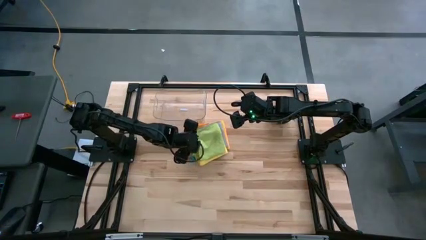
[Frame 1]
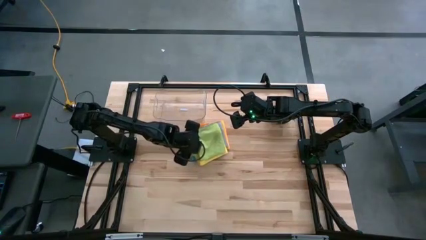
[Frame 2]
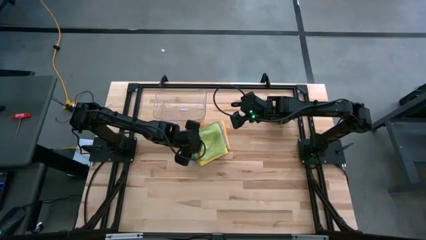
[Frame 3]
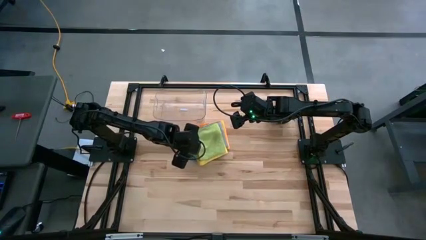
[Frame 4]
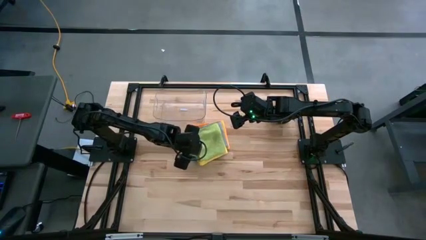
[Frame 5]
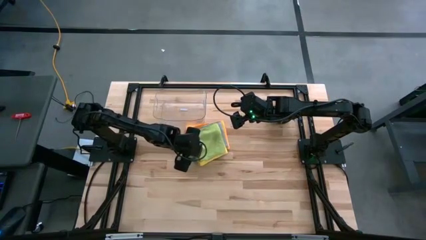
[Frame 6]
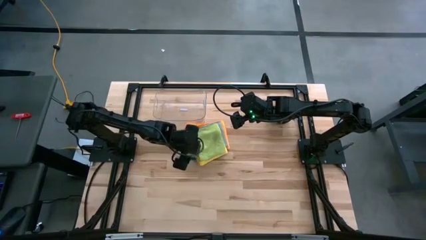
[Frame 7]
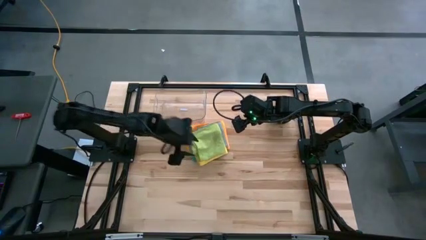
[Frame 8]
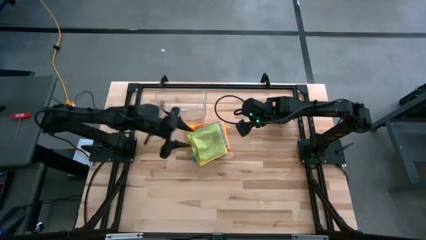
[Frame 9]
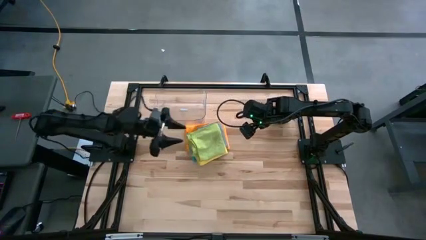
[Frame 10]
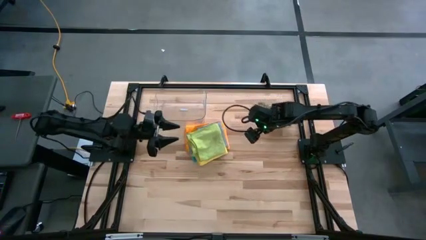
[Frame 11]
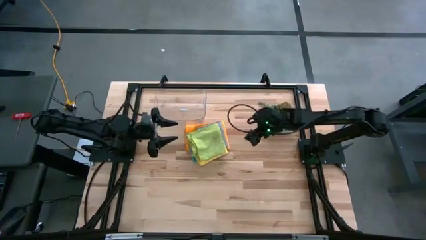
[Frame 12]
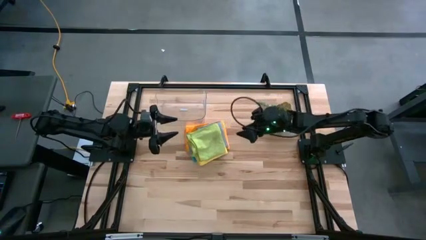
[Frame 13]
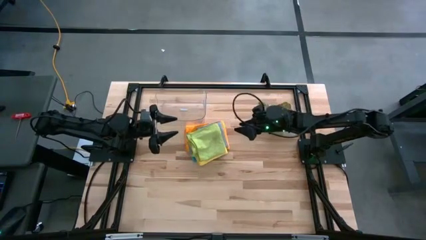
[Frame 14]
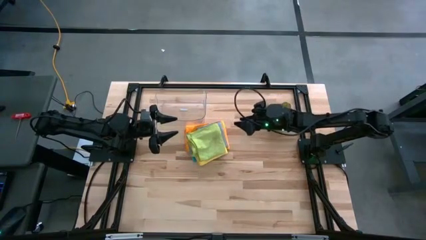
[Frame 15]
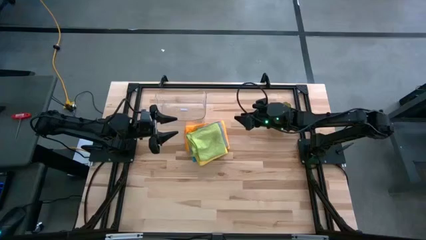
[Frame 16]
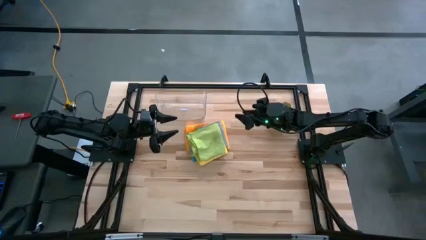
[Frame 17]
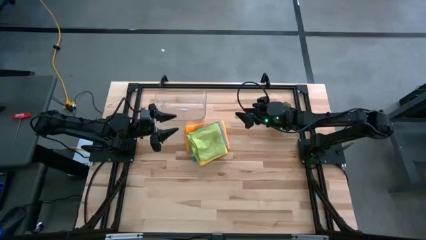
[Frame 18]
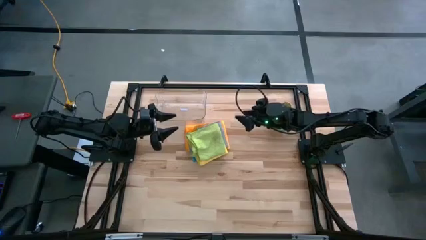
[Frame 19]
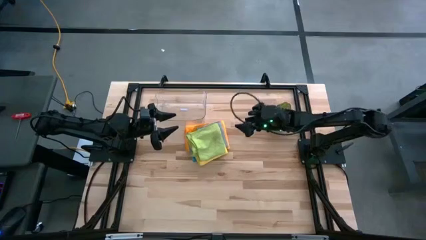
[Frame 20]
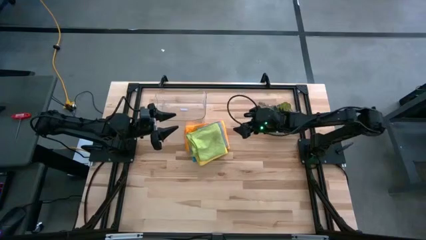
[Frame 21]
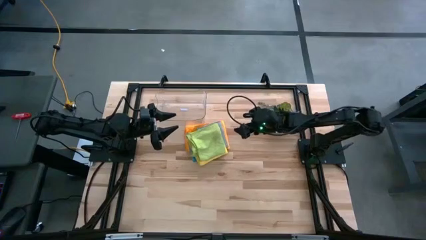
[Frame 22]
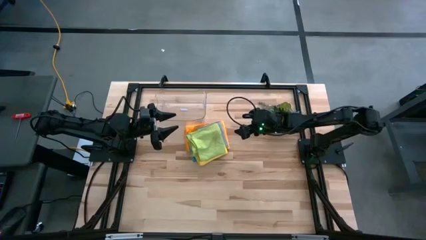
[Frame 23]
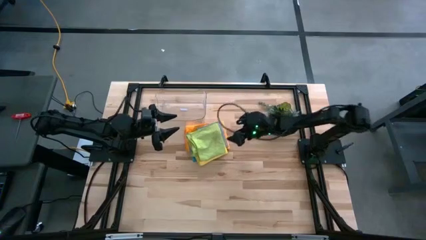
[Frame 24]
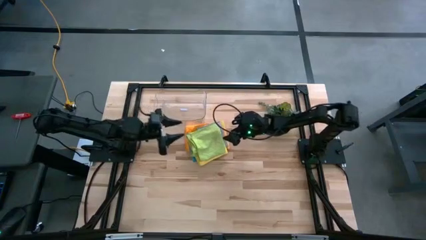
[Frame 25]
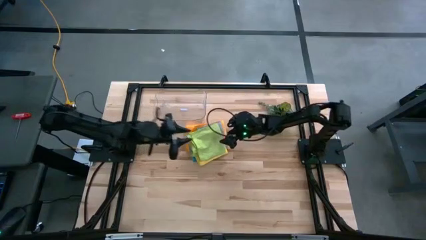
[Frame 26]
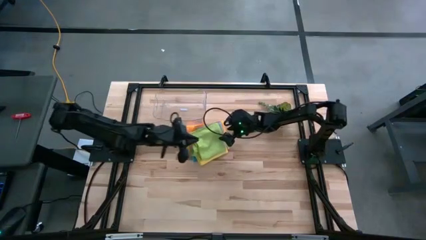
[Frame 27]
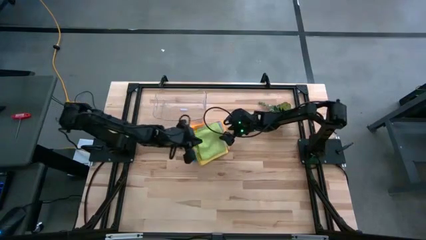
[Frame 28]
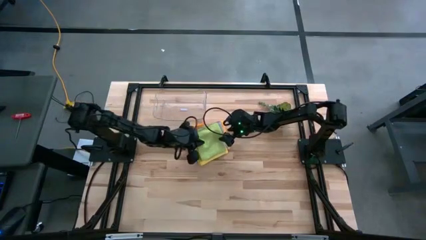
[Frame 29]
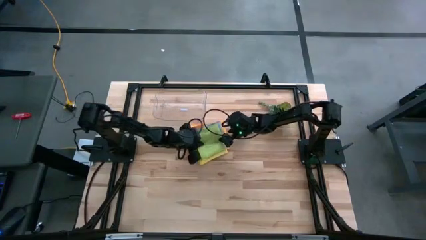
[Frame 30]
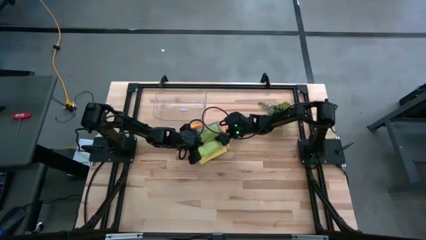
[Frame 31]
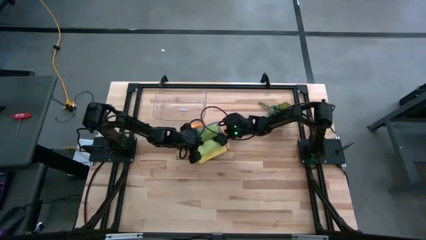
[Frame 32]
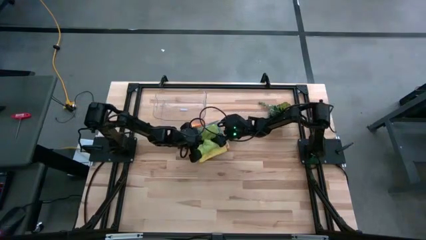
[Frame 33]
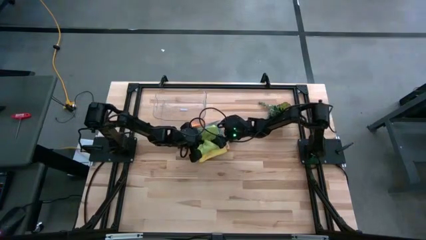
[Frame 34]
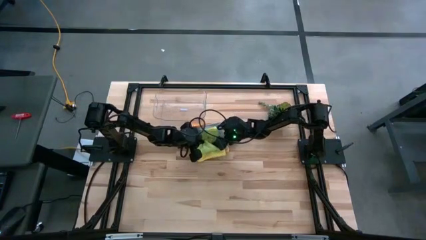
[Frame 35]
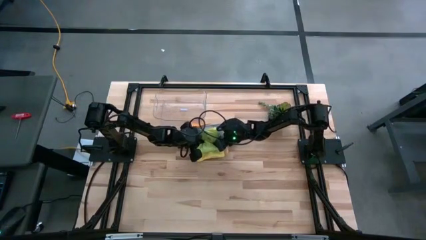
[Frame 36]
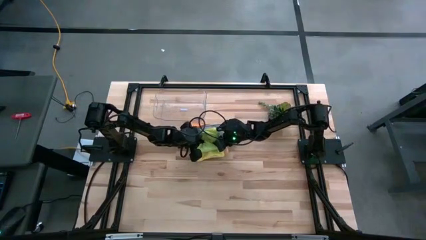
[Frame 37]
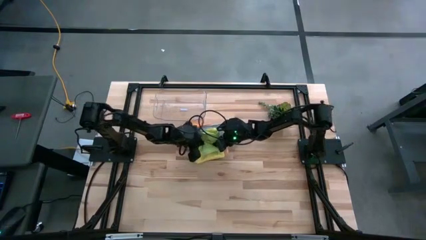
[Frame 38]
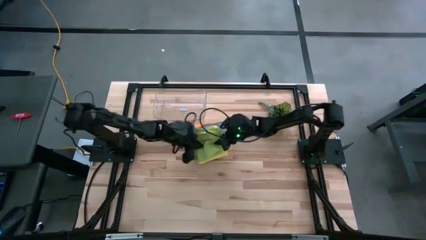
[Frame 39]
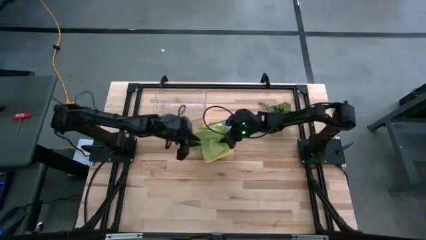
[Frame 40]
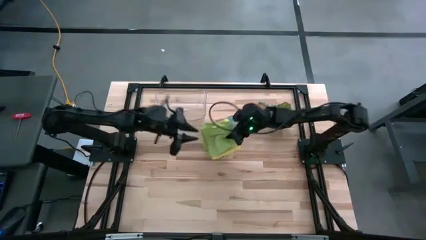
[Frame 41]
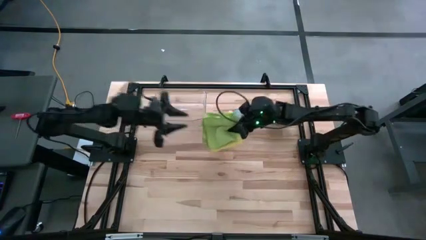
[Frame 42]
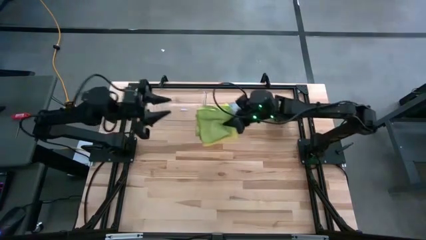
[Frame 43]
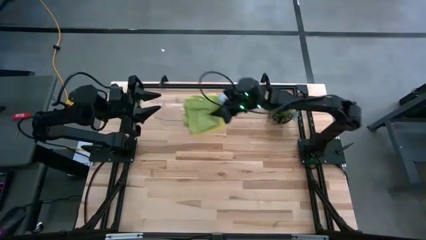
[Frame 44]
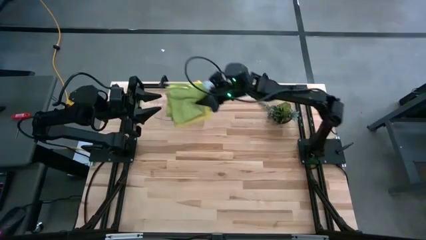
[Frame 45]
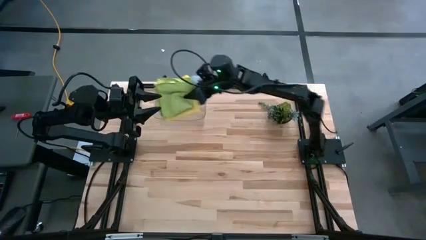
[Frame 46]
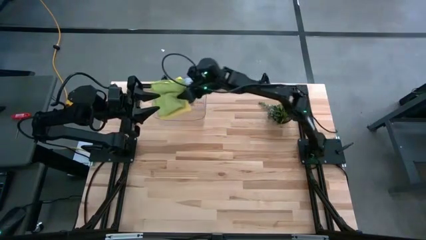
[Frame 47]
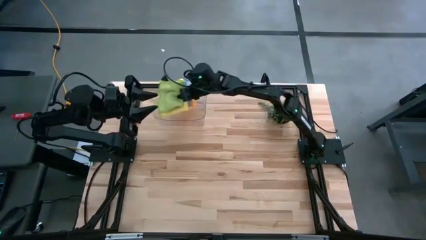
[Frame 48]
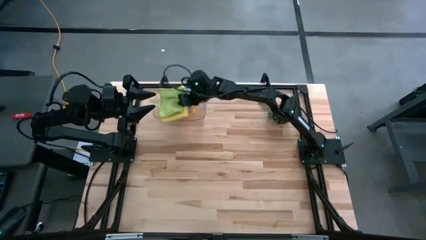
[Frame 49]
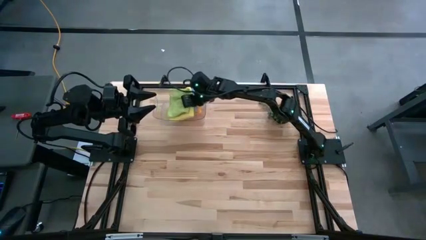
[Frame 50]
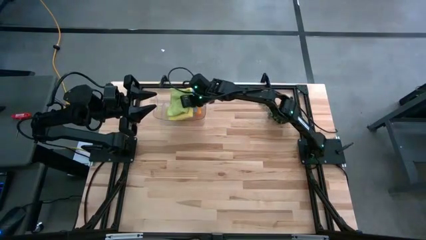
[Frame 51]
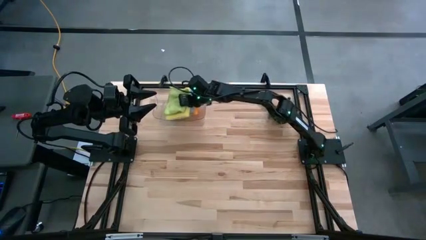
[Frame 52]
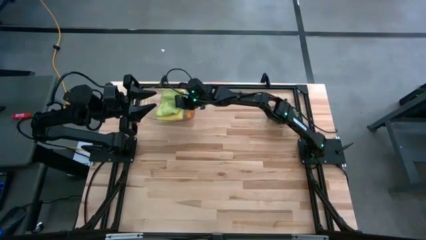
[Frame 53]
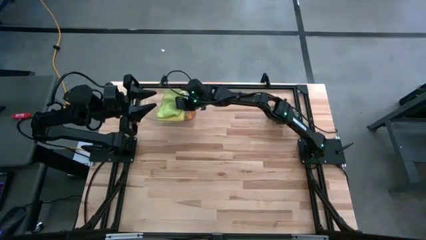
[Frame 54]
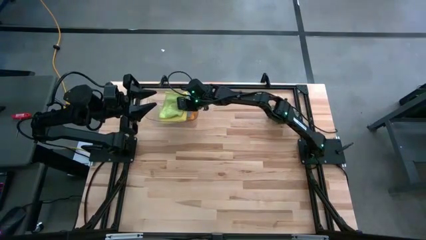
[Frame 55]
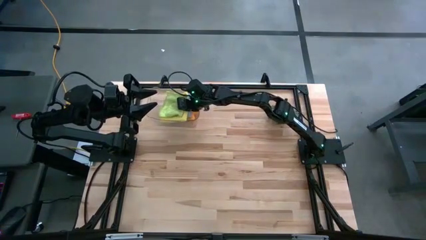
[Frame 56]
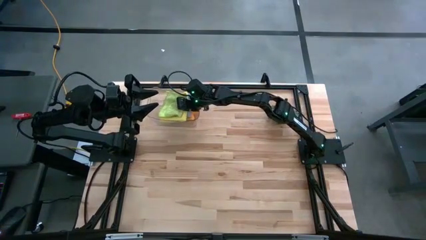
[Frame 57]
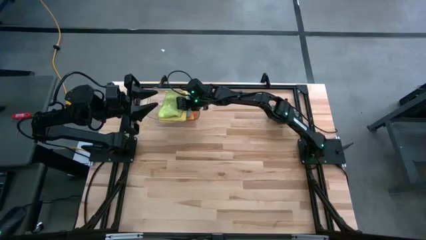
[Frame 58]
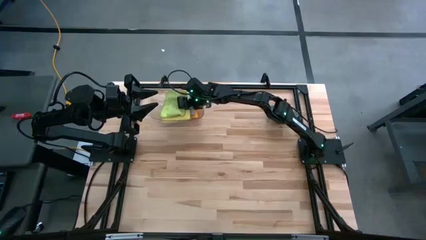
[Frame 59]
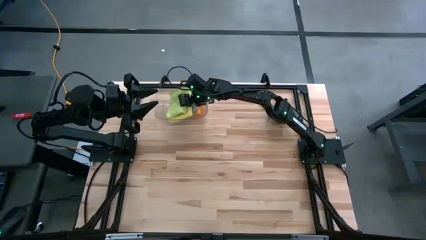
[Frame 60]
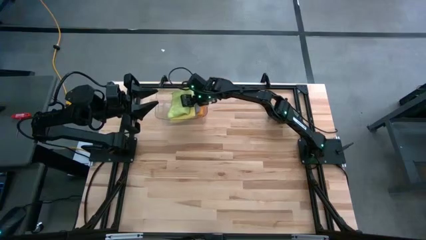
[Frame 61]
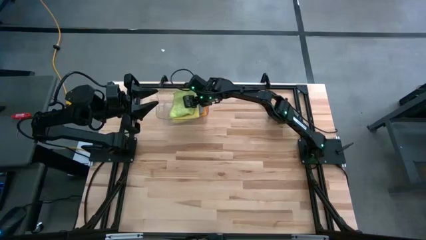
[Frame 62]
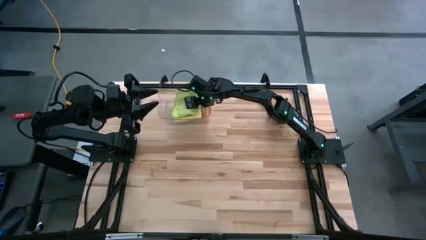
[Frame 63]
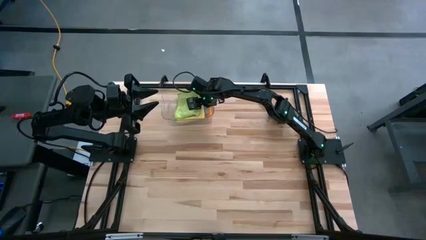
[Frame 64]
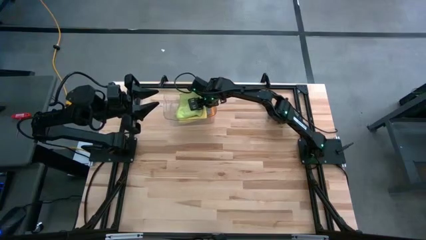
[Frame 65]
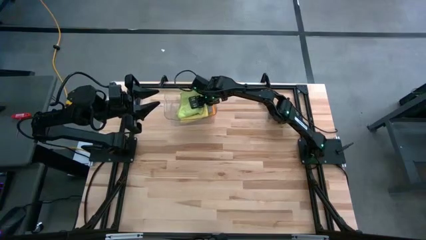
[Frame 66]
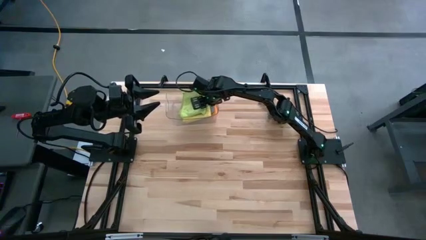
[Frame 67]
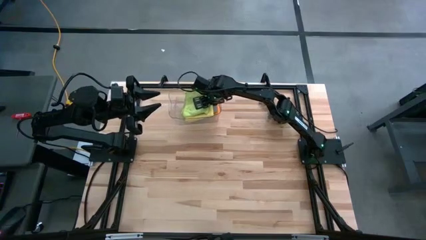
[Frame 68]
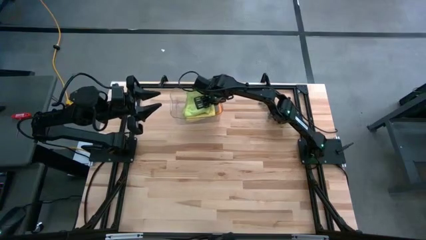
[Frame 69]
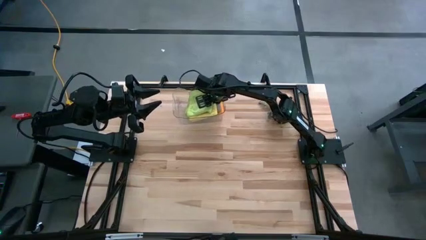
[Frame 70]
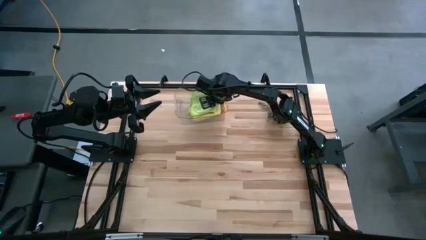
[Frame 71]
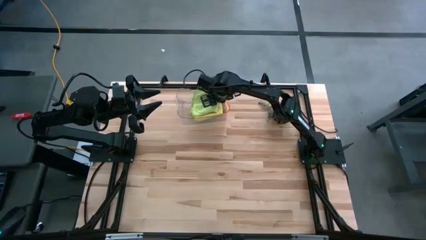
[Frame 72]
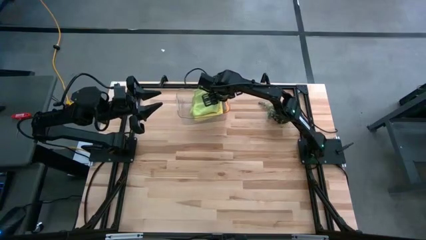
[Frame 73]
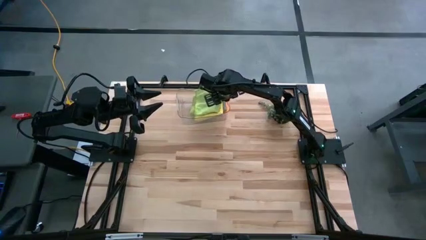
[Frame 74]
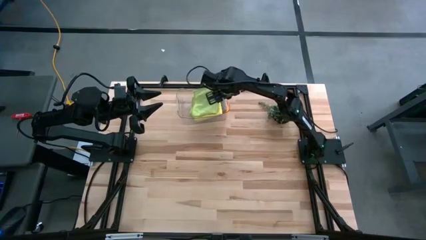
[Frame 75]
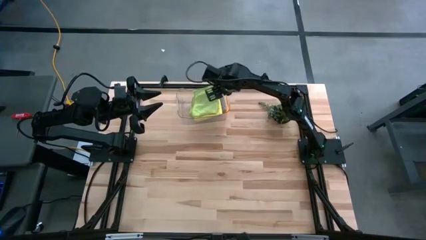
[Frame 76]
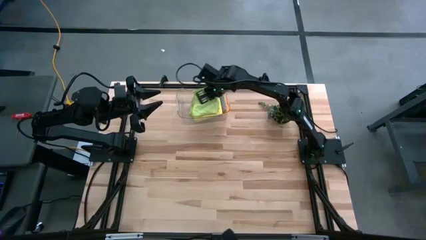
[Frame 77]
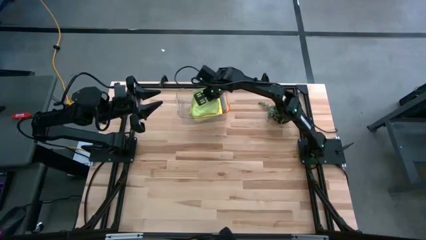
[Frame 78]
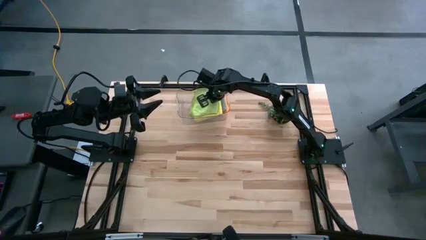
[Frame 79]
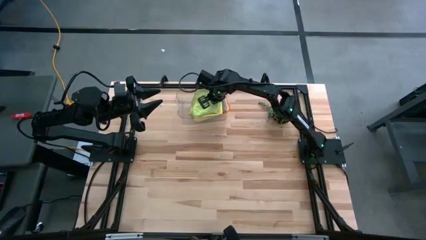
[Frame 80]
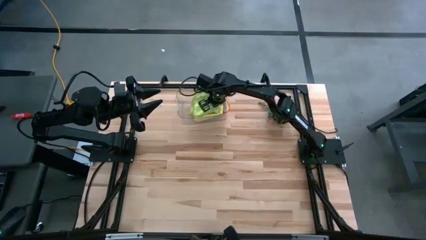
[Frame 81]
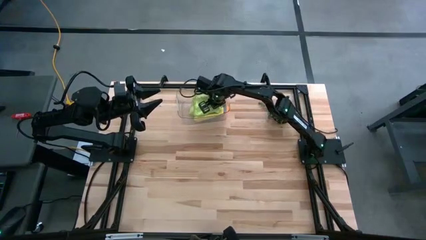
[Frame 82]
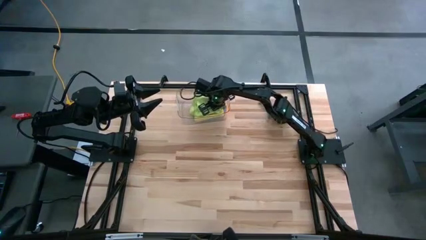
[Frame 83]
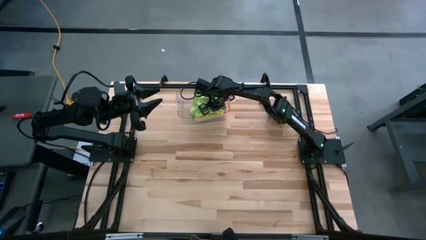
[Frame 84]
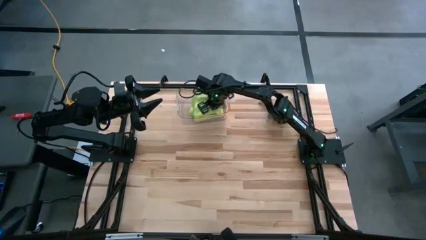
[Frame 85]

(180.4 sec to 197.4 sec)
Task: Fold microfiber towels
Put the stacked colored towels in the transparent bin
